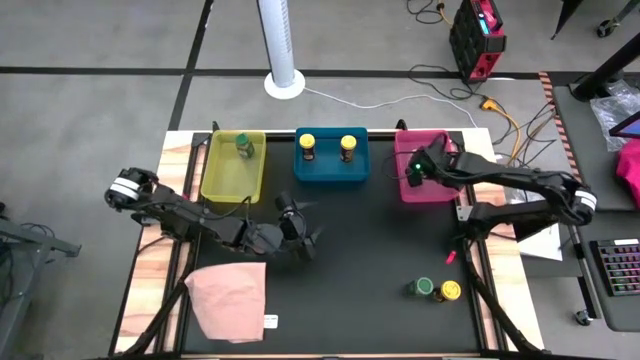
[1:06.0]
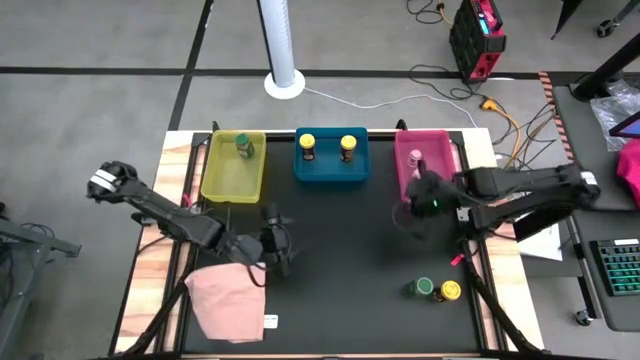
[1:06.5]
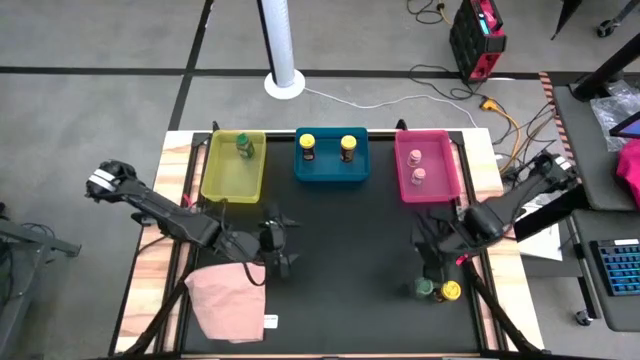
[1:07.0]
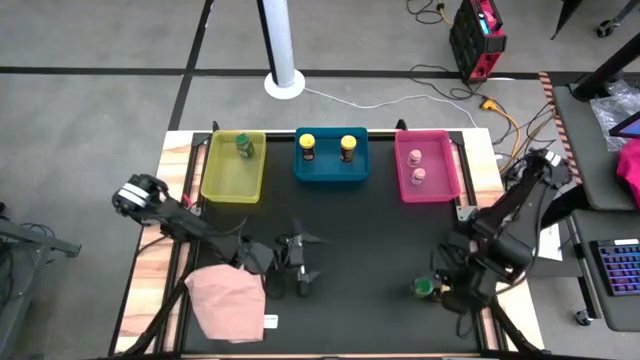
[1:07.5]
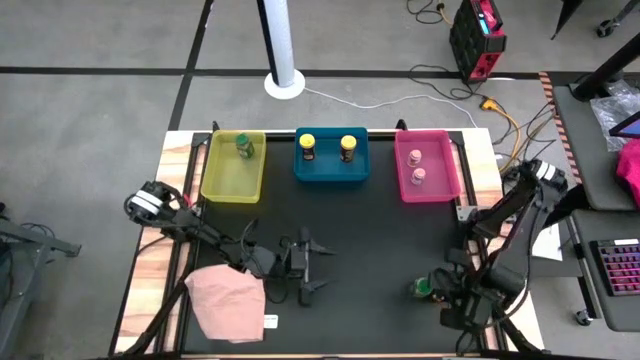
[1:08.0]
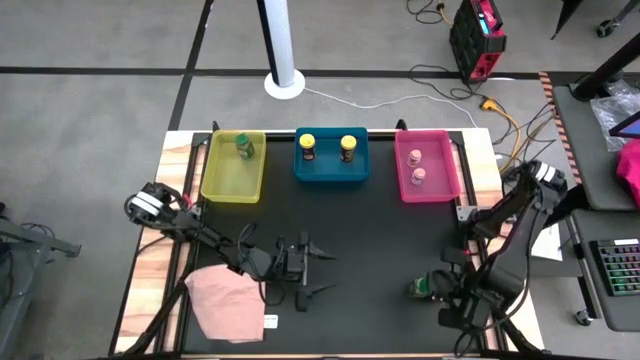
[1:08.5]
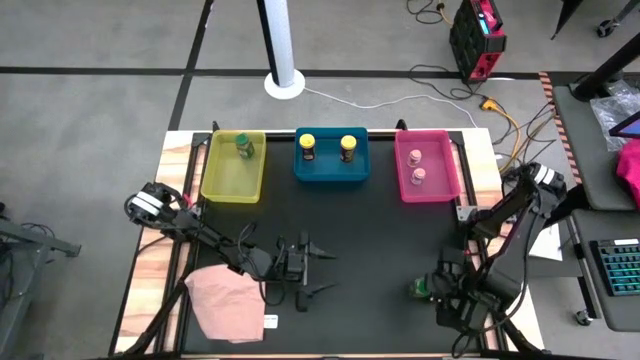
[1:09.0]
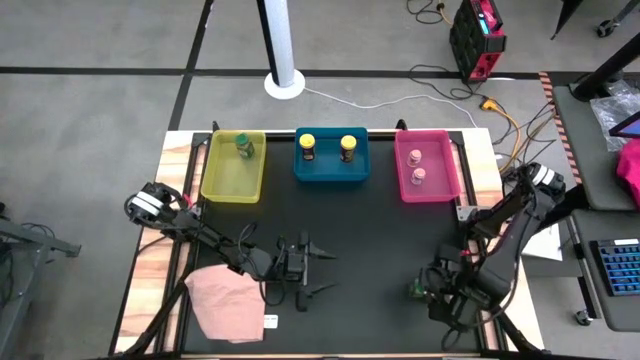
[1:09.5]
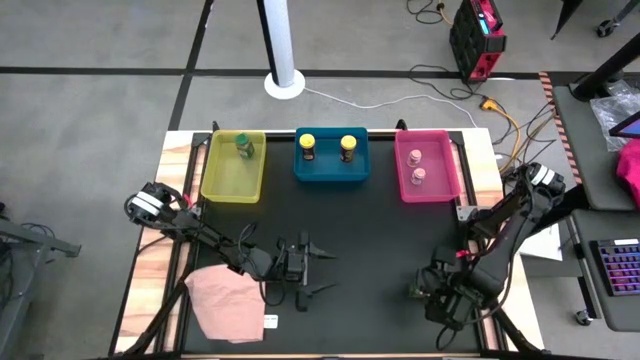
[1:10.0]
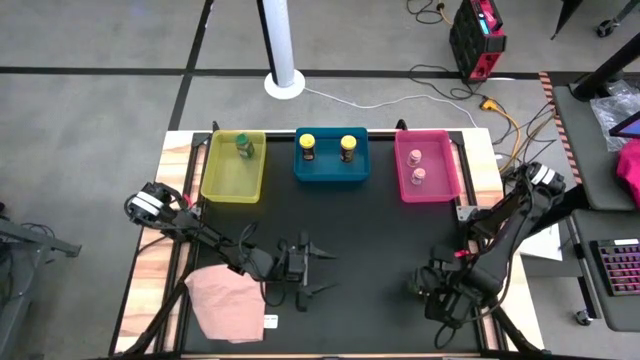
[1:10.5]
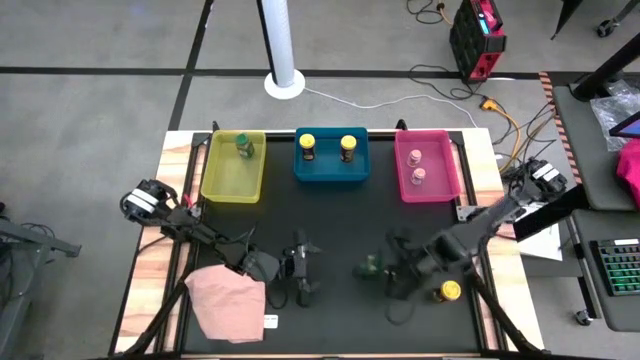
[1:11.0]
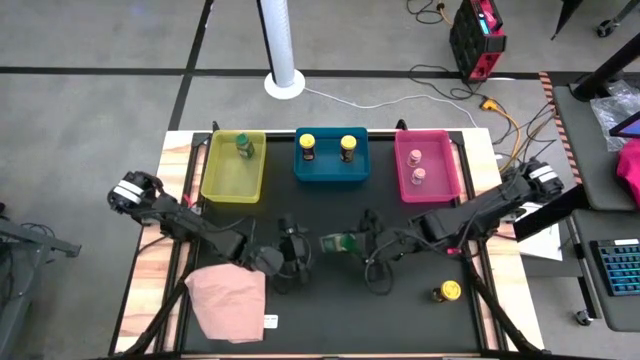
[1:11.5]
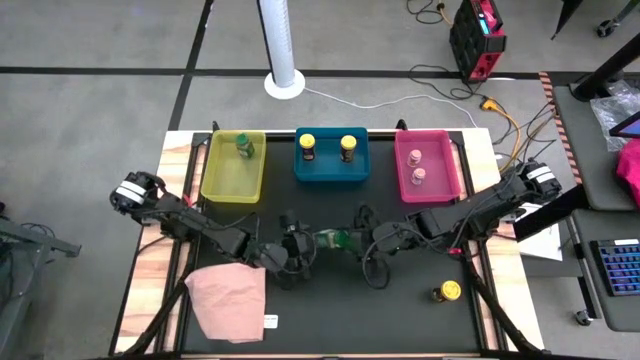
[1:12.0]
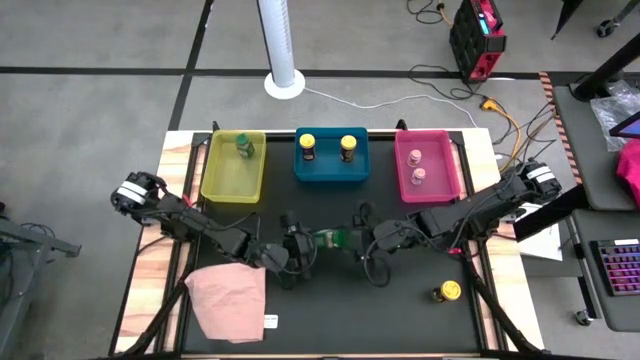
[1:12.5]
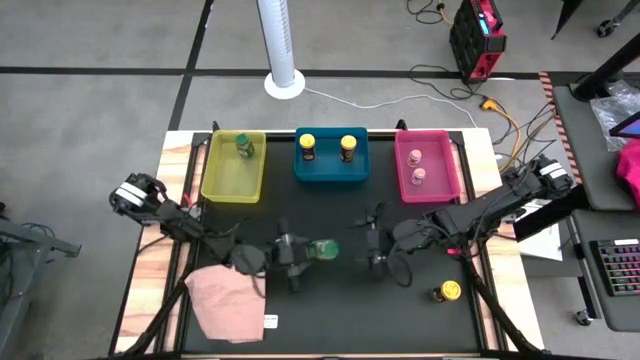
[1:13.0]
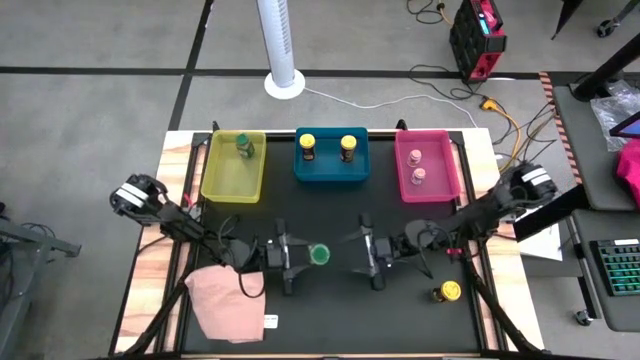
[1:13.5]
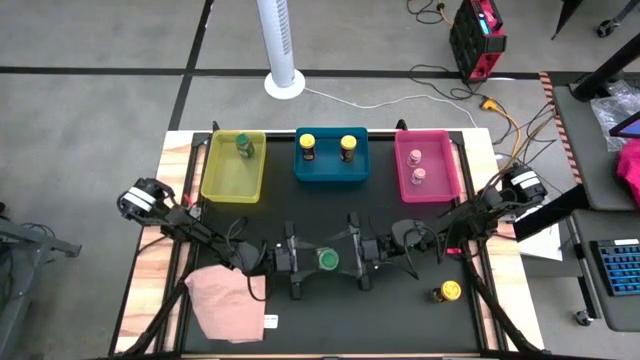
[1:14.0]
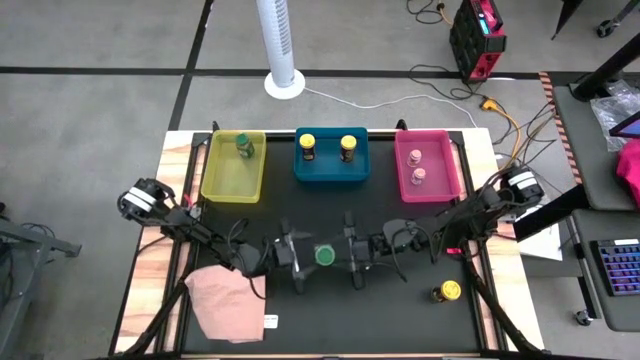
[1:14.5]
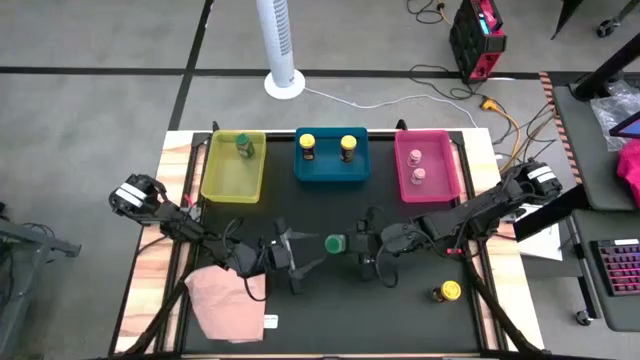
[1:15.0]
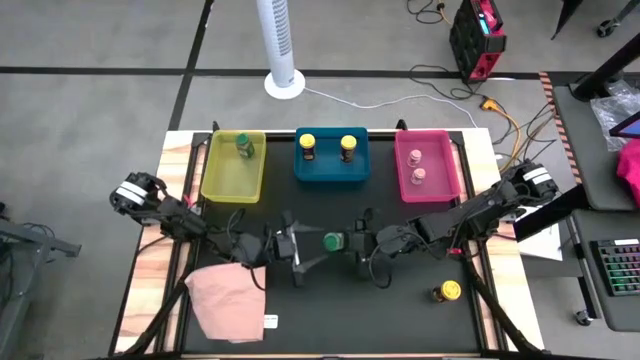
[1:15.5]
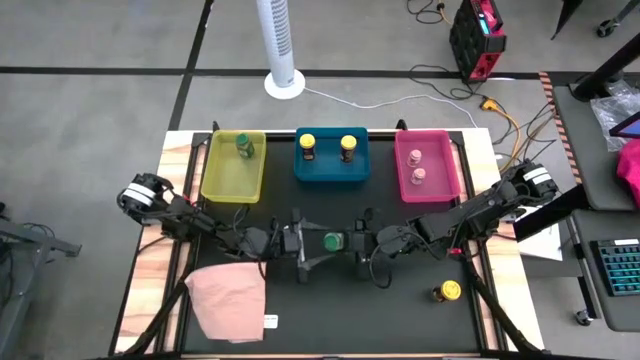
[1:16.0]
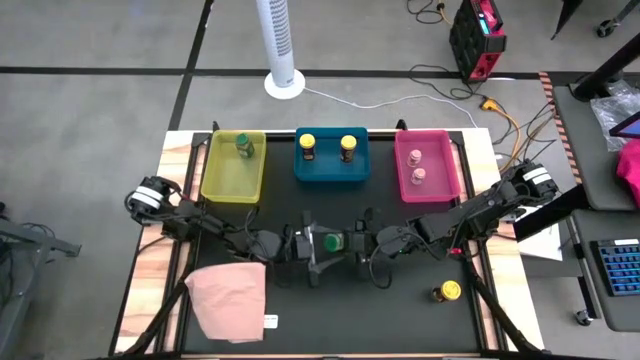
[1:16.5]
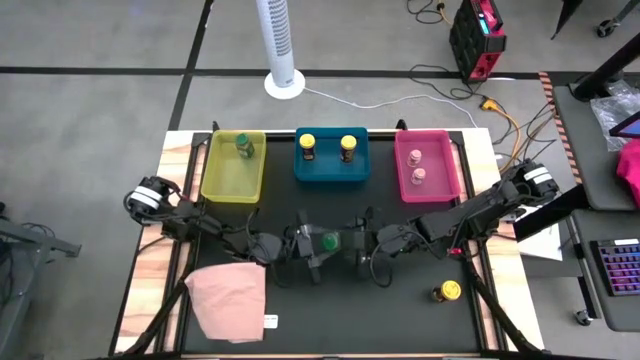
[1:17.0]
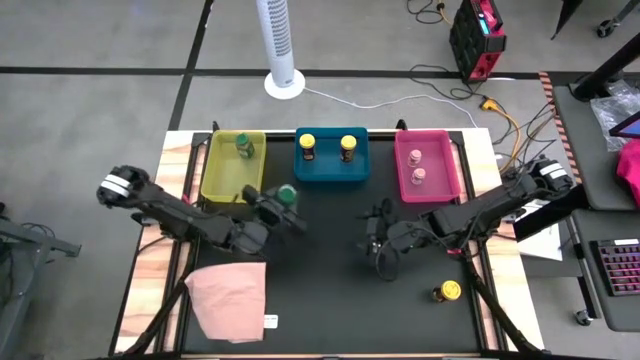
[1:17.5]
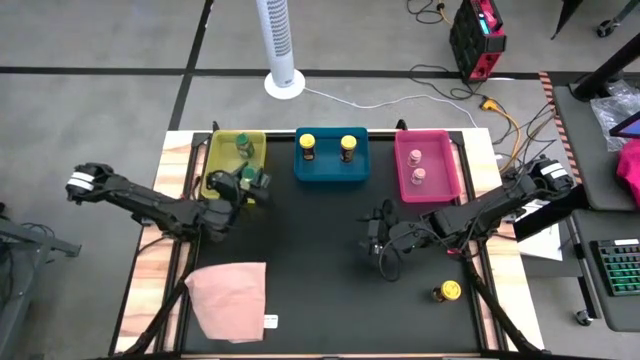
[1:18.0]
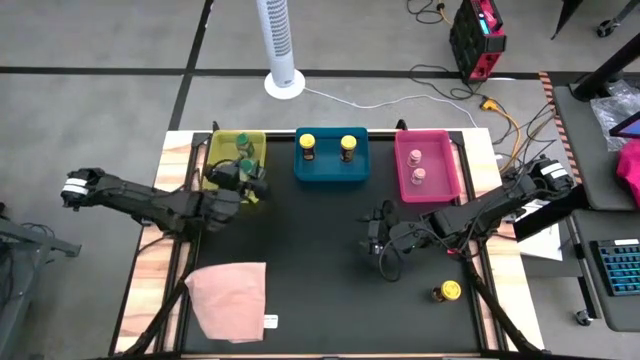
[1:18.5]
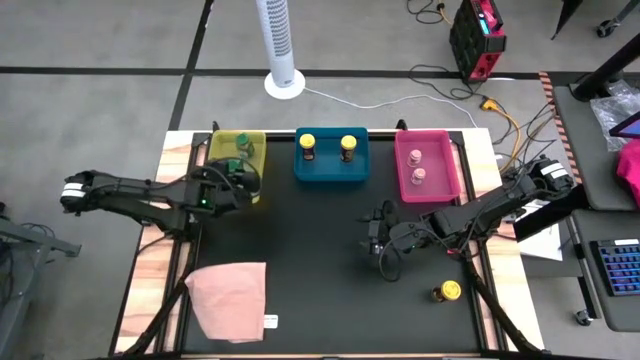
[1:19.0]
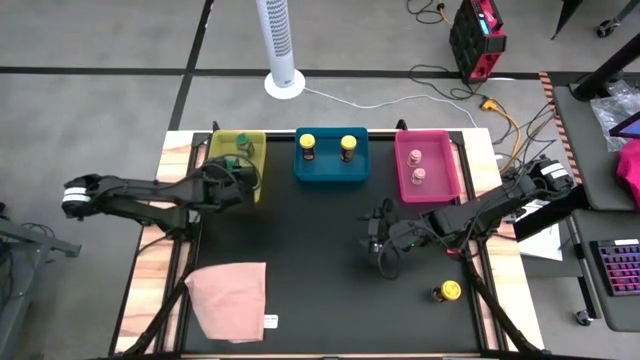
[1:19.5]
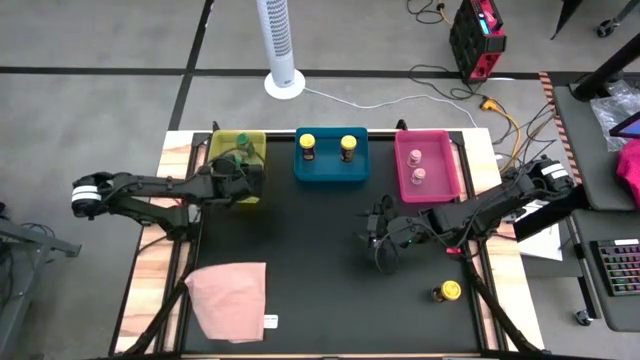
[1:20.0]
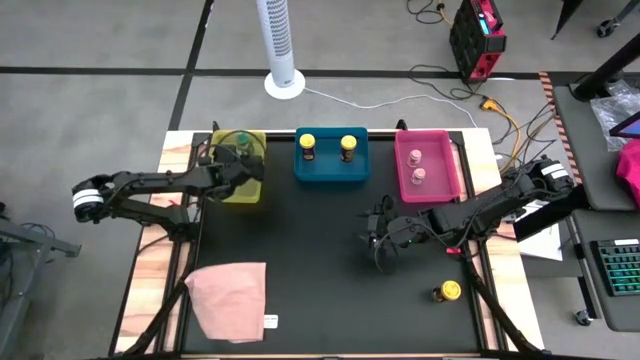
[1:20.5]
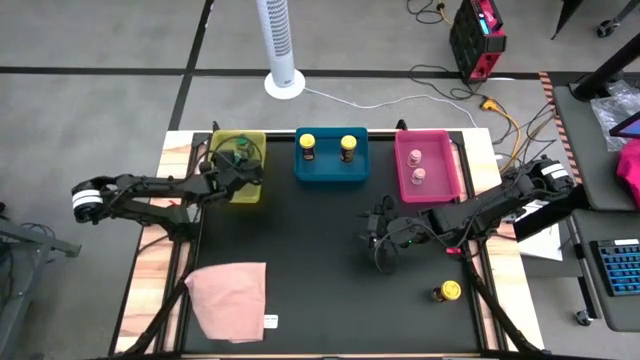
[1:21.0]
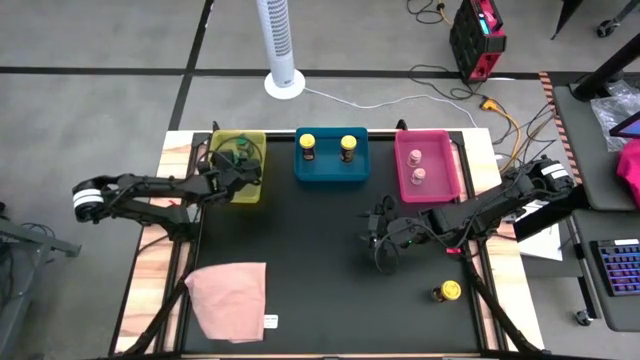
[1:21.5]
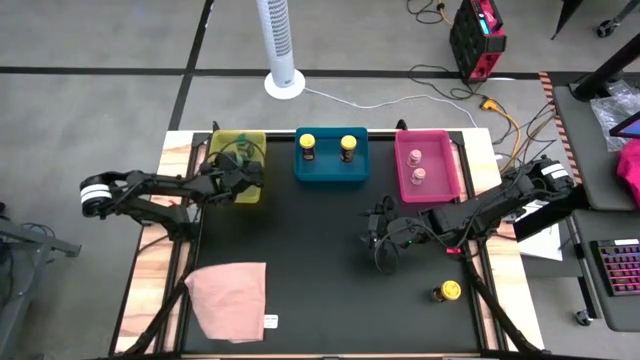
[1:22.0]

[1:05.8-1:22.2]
Task: Sort spices by type
Put the green seasoning bottle into the yellow bin

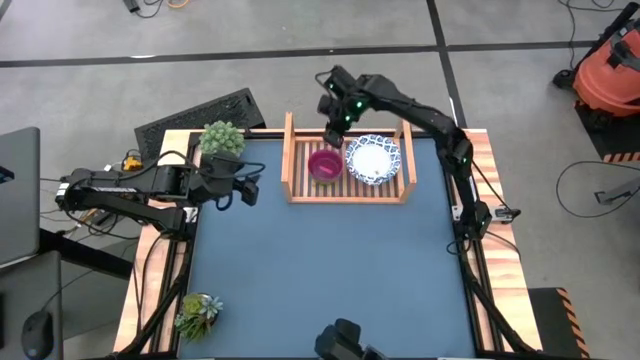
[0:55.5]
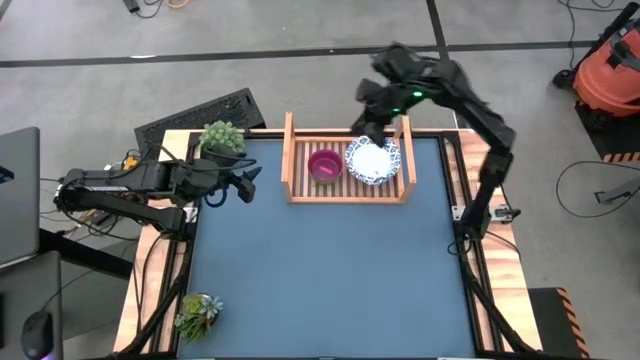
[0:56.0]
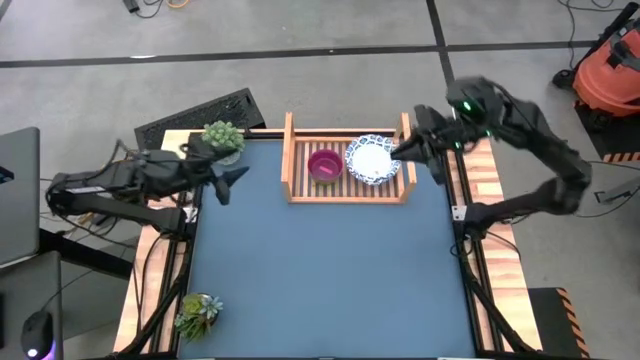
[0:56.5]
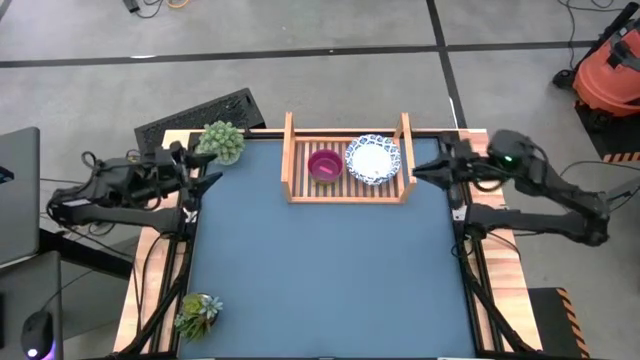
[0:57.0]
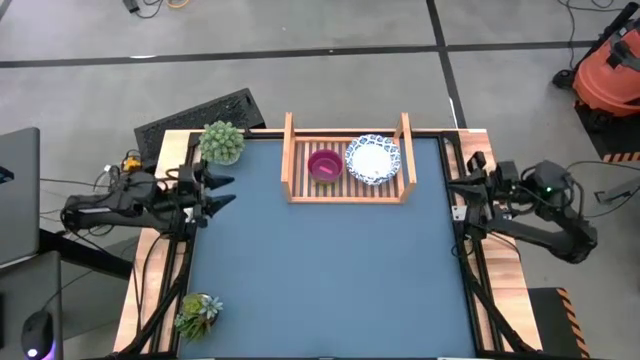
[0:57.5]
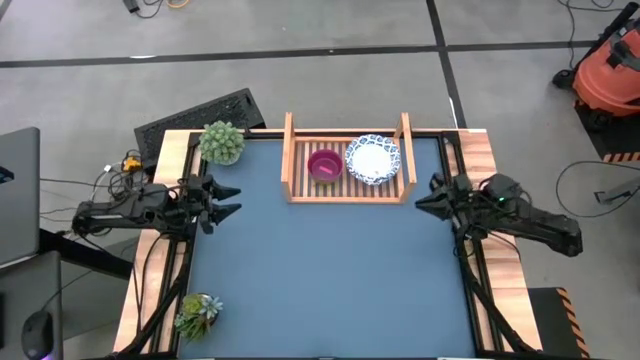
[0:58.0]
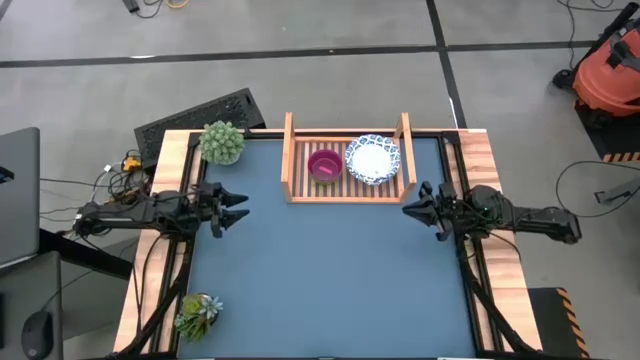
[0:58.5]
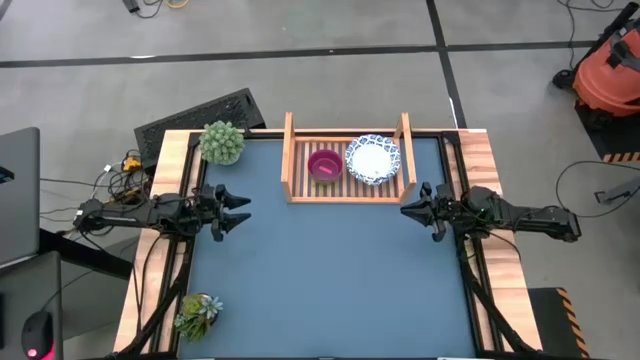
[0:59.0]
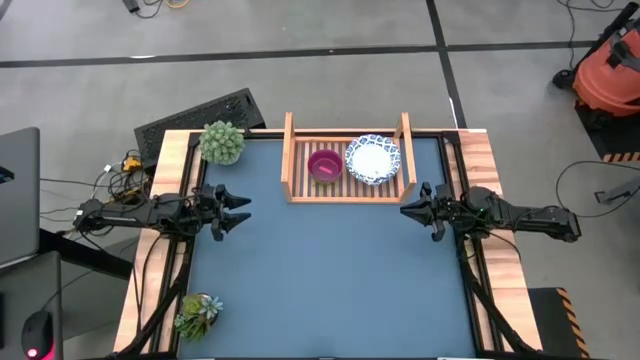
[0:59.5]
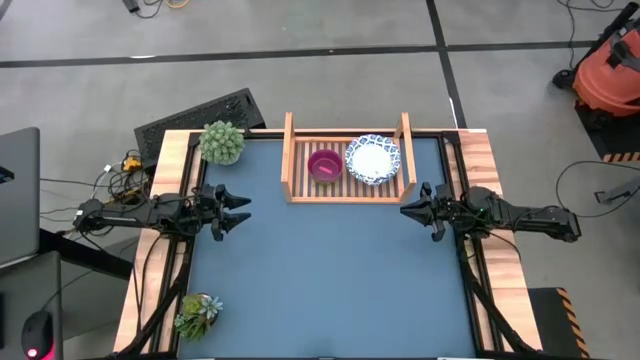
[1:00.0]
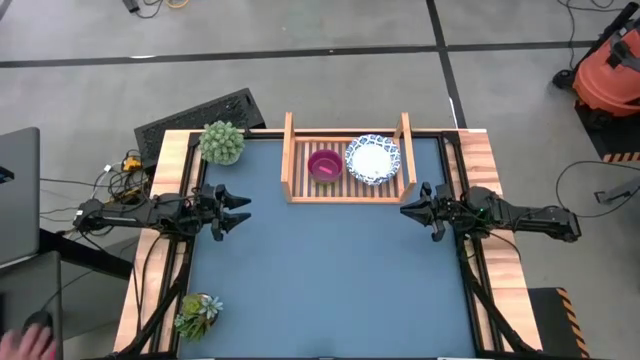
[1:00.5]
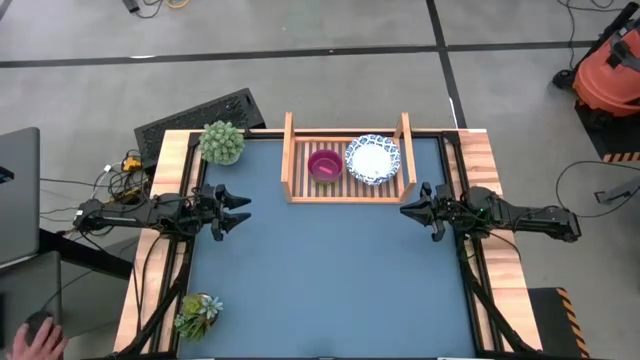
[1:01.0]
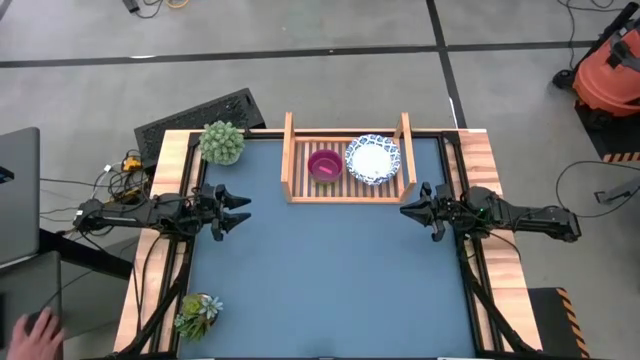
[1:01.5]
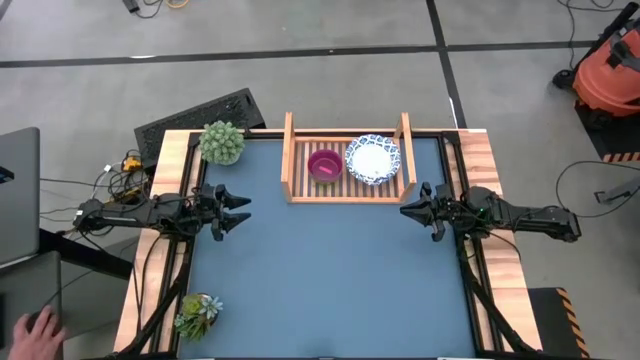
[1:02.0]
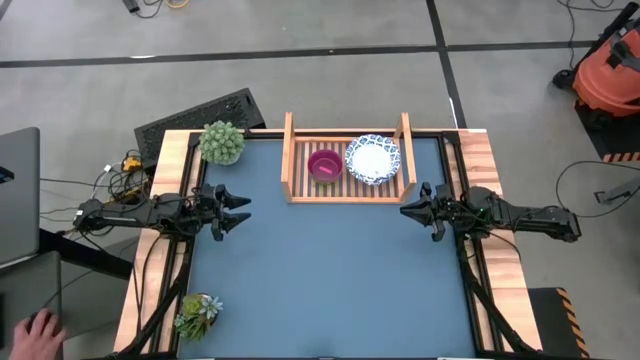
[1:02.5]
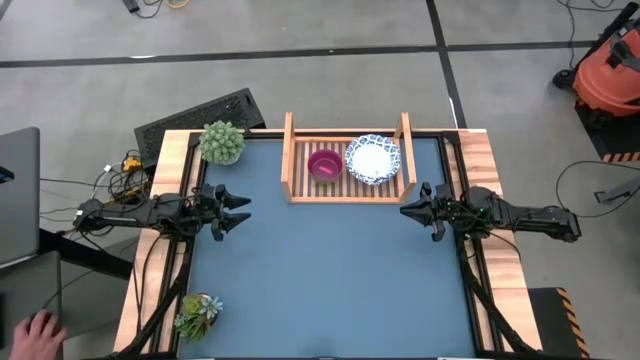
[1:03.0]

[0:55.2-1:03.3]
Task: Place and stack bowls onto a shelf
Return to Home Position
